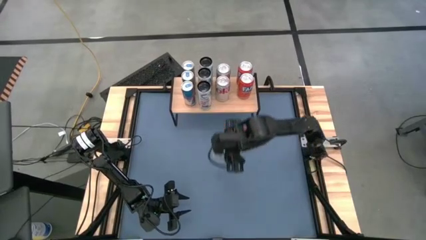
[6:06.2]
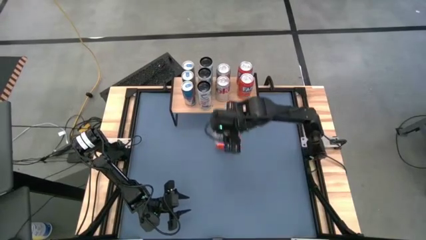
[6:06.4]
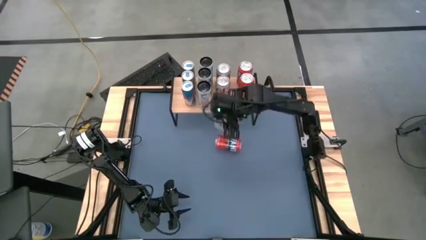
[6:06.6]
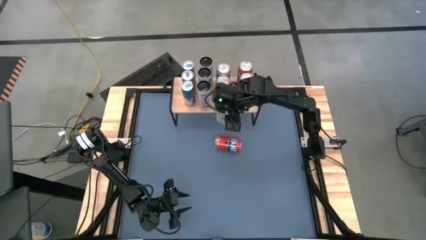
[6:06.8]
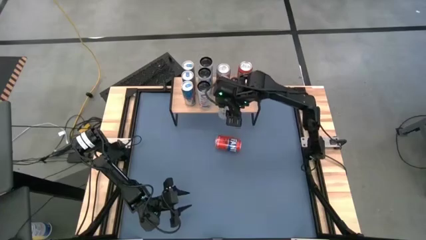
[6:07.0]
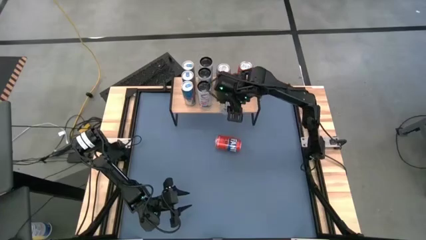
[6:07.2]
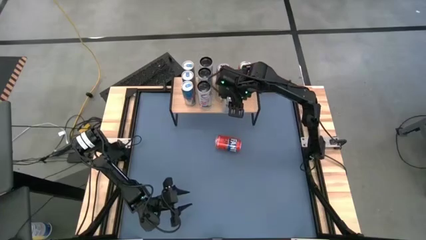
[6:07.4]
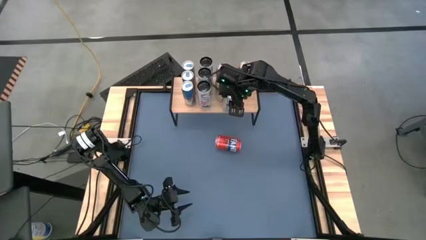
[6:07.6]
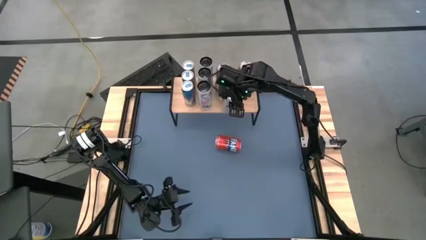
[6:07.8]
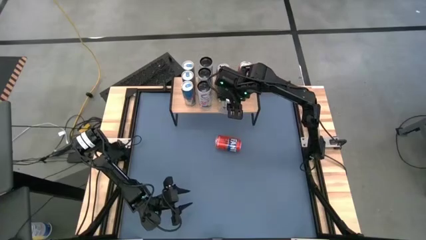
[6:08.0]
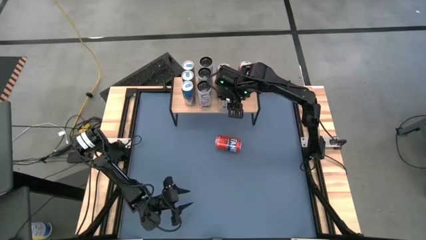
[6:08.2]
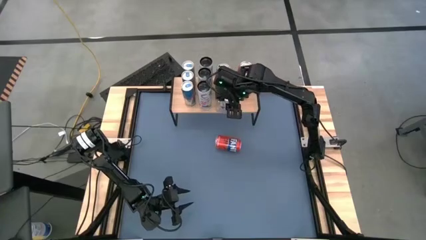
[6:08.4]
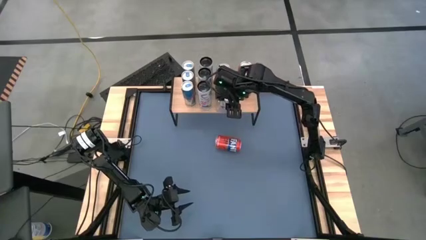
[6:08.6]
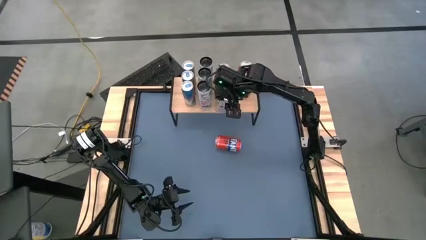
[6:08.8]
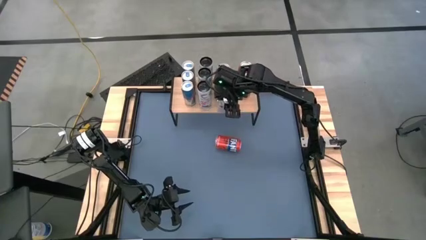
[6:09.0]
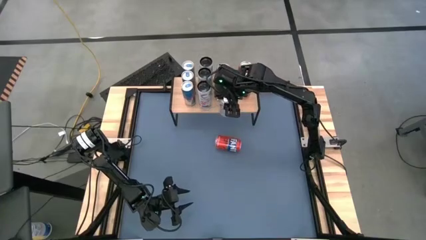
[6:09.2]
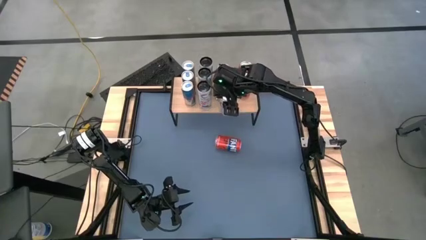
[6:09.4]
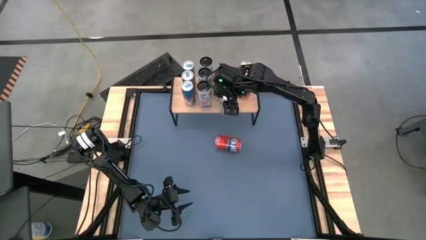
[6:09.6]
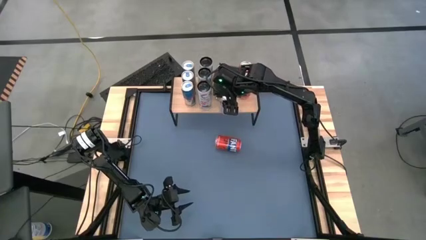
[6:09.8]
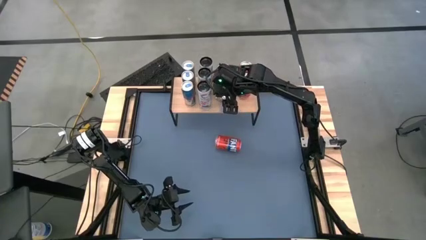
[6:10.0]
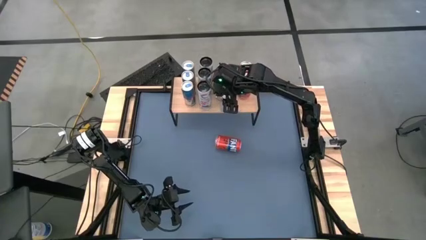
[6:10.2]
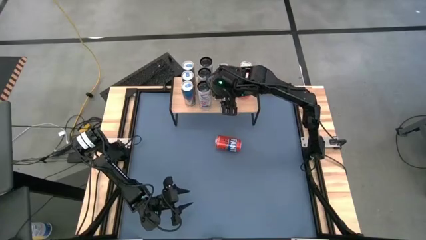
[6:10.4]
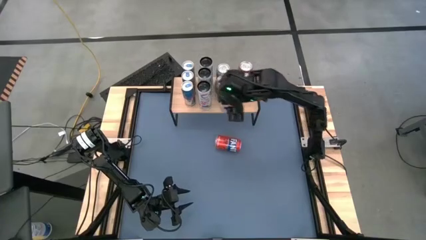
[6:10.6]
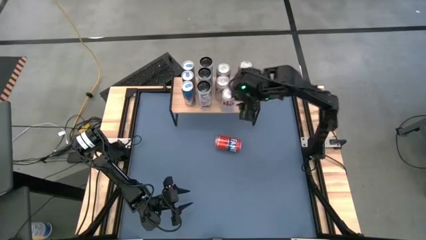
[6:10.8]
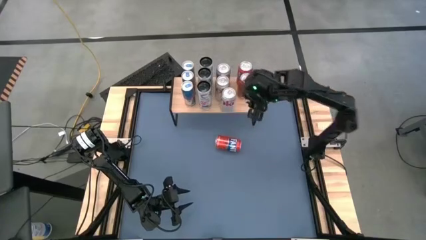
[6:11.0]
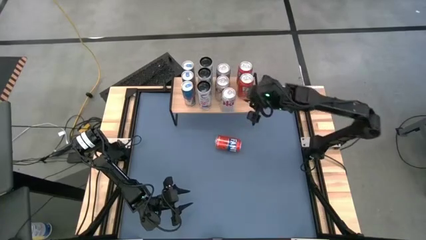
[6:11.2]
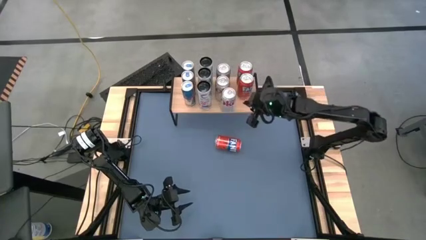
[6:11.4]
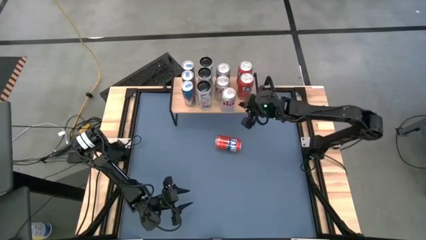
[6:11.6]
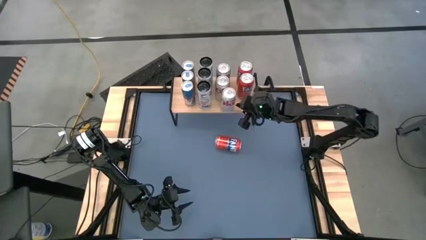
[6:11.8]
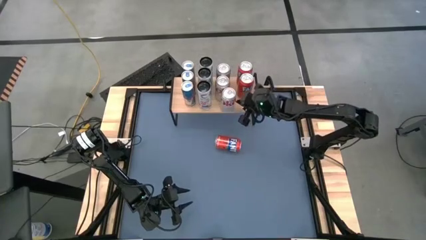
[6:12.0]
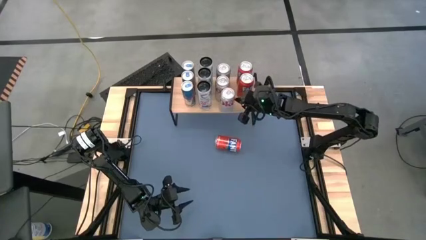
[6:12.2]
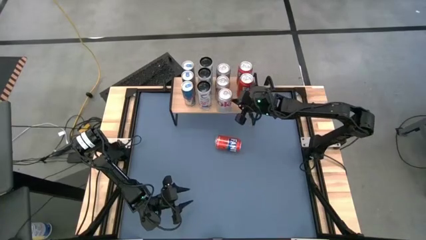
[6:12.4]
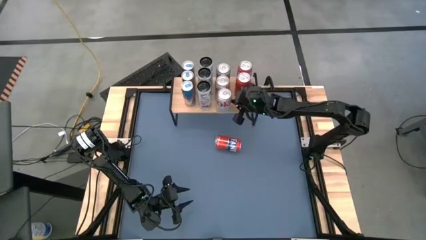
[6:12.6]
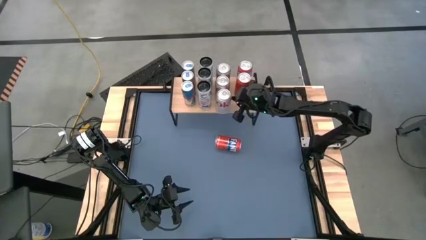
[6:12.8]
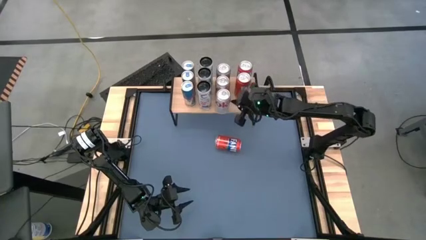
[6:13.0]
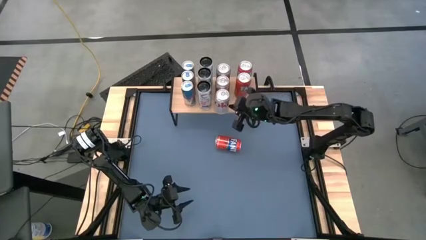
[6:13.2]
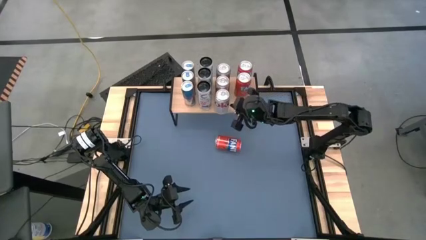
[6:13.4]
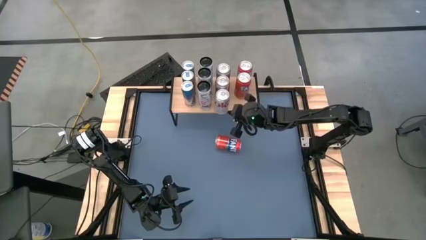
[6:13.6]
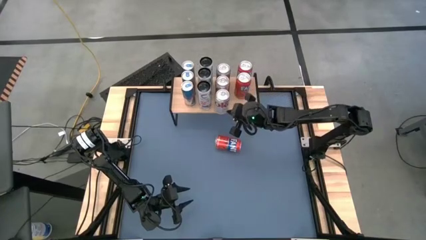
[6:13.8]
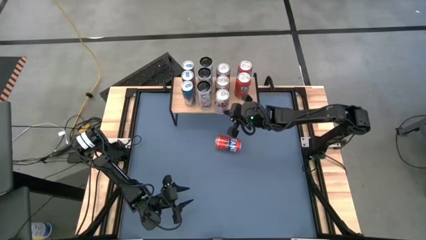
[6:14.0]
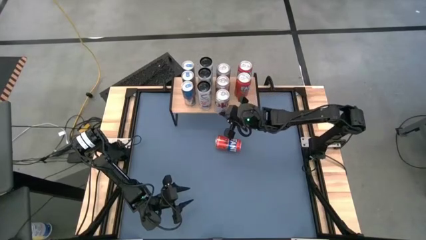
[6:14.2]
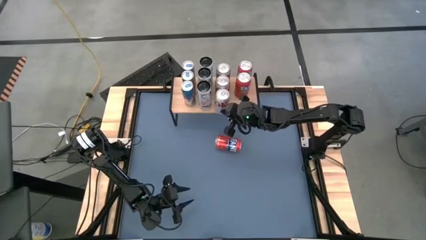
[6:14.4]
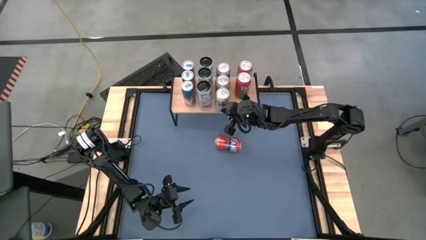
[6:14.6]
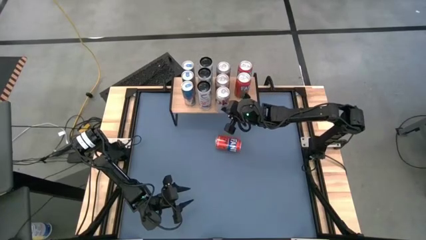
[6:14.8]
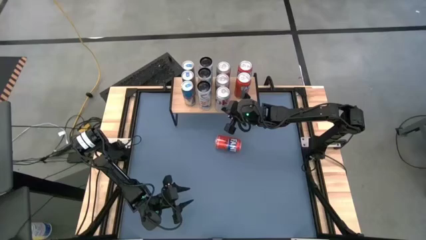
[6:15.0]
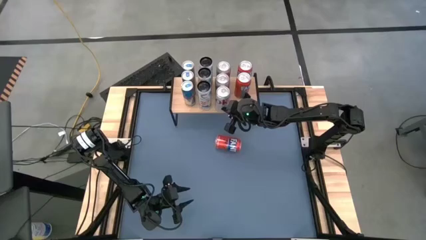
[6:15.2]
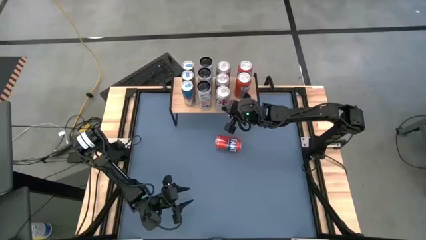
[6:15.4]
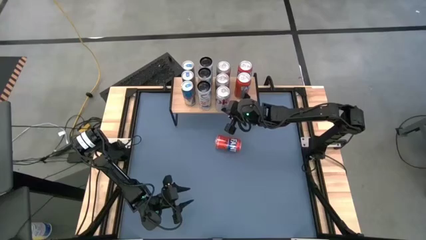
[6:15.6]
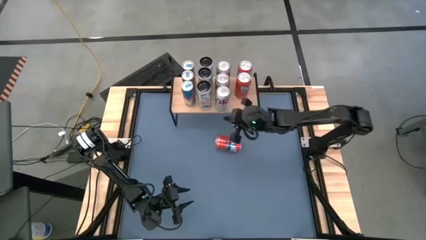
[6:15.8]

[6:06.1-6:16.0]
Task: Place canned beverage on shelf
Put the silver soda can on the shelf aligned with the other silver soda can

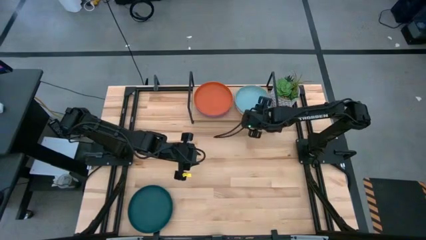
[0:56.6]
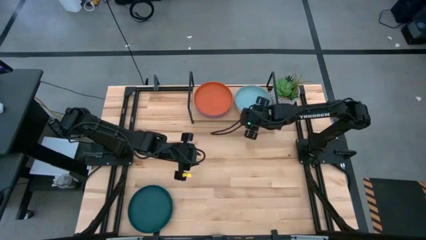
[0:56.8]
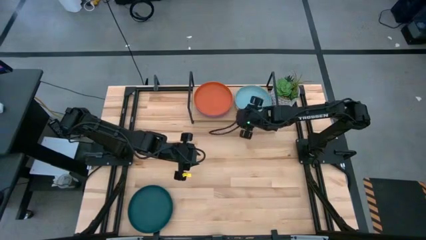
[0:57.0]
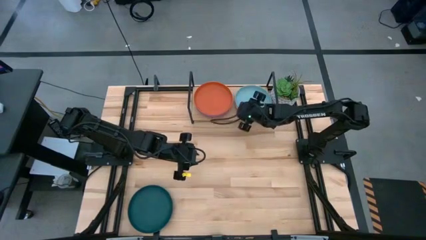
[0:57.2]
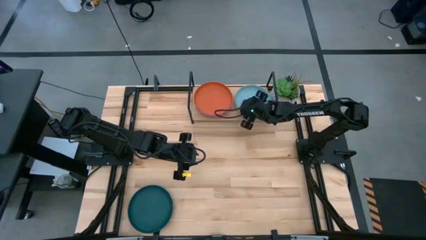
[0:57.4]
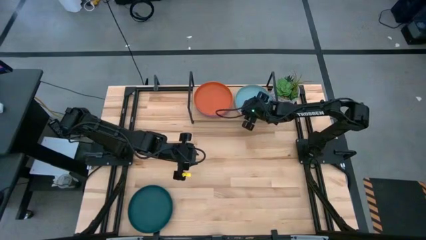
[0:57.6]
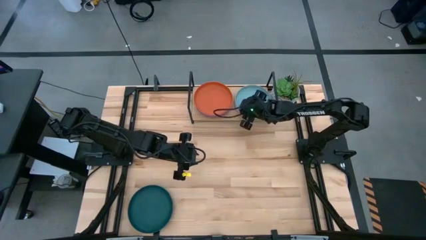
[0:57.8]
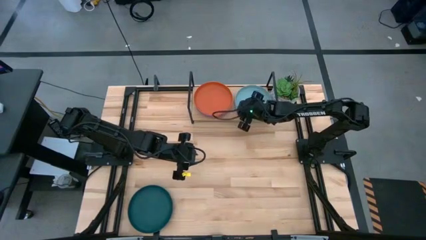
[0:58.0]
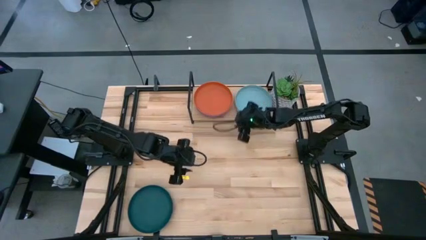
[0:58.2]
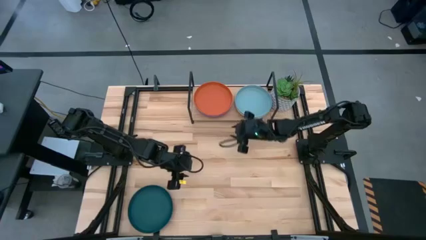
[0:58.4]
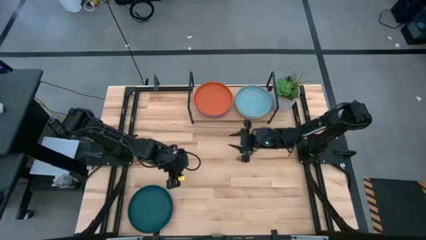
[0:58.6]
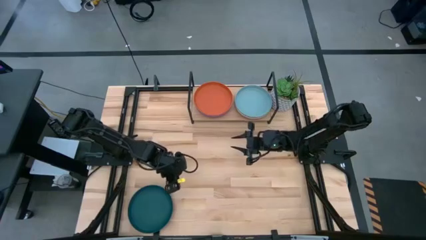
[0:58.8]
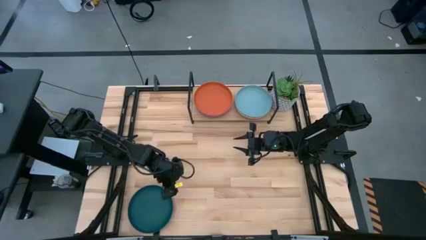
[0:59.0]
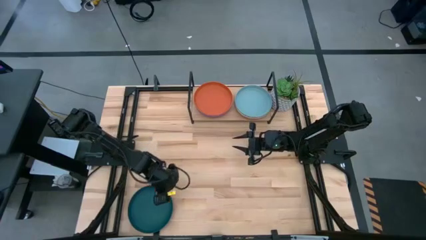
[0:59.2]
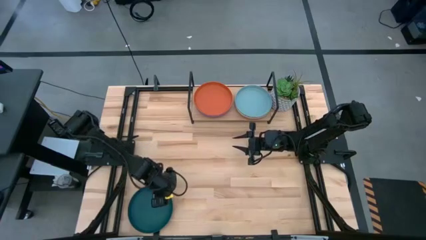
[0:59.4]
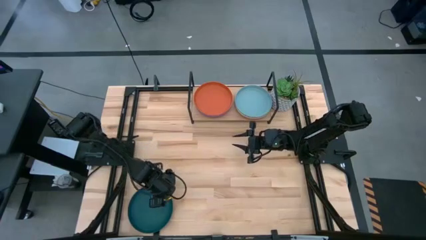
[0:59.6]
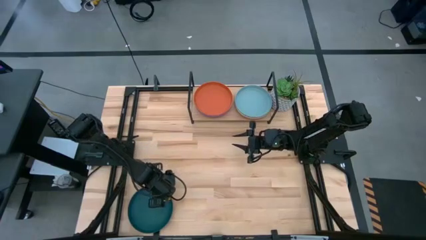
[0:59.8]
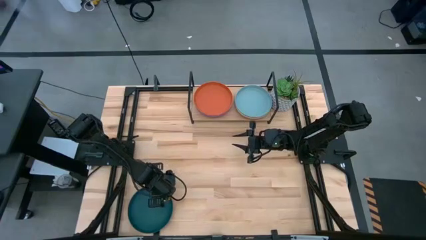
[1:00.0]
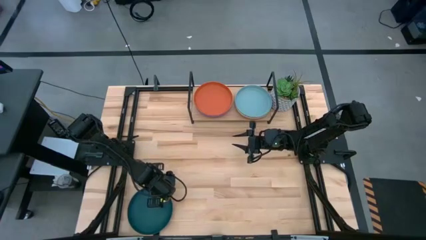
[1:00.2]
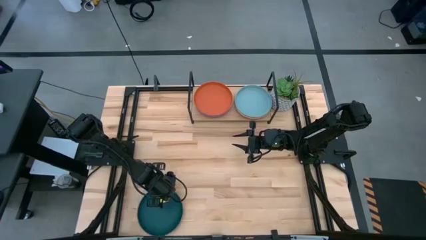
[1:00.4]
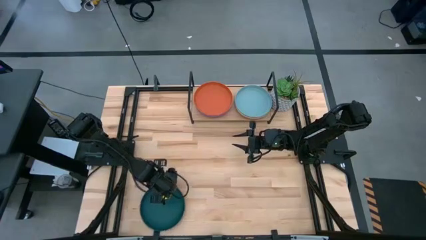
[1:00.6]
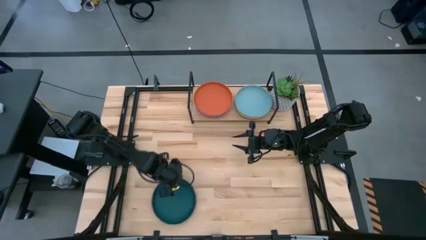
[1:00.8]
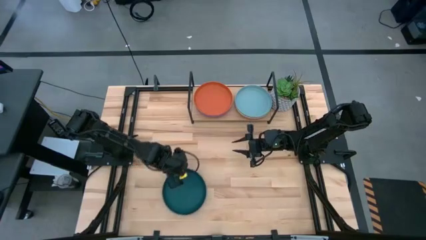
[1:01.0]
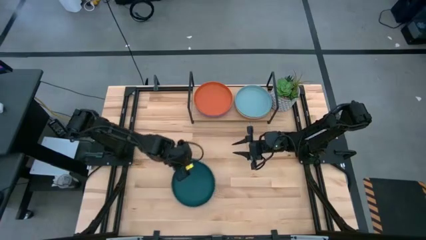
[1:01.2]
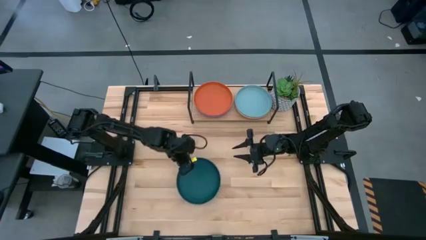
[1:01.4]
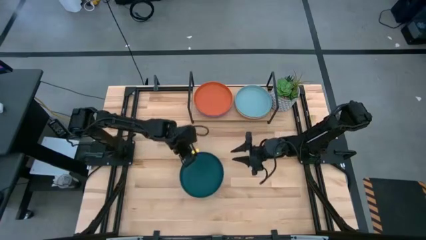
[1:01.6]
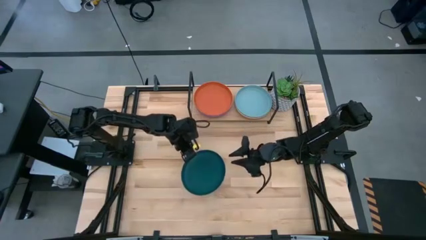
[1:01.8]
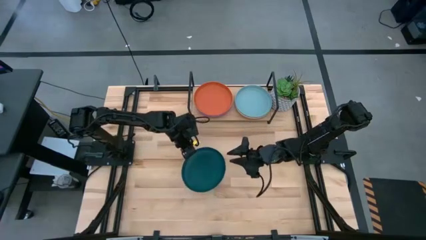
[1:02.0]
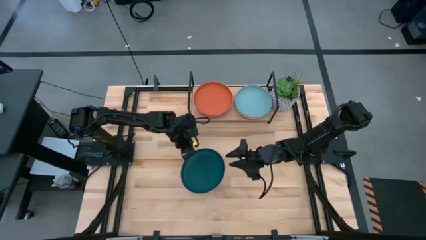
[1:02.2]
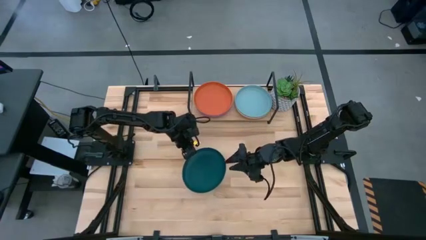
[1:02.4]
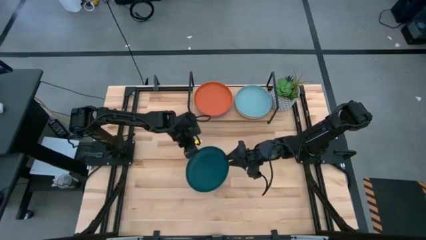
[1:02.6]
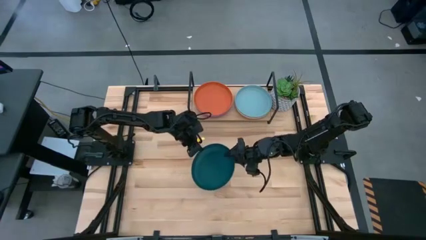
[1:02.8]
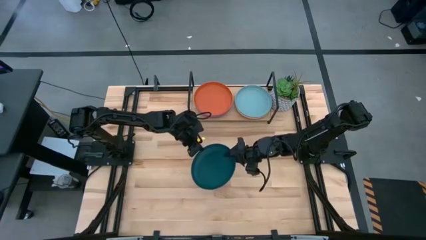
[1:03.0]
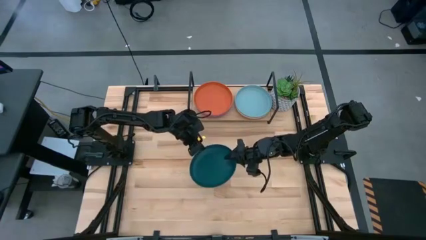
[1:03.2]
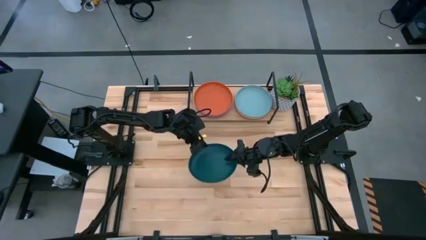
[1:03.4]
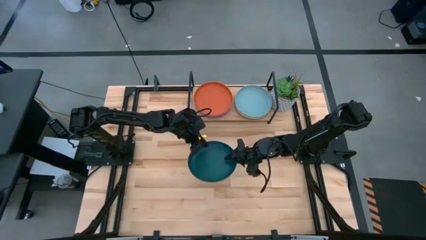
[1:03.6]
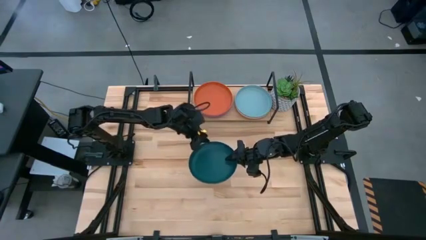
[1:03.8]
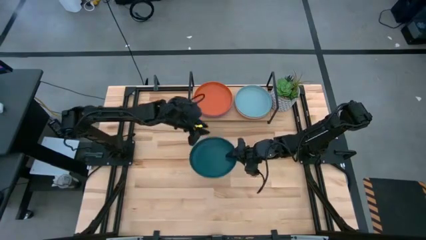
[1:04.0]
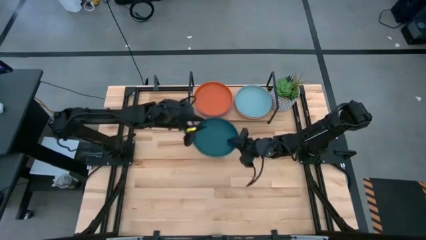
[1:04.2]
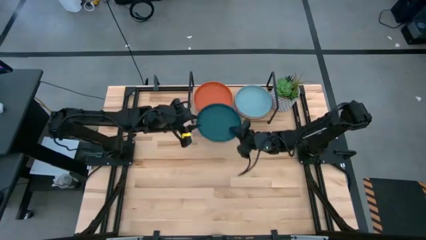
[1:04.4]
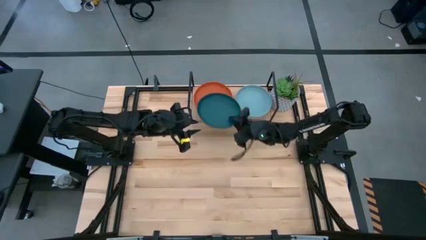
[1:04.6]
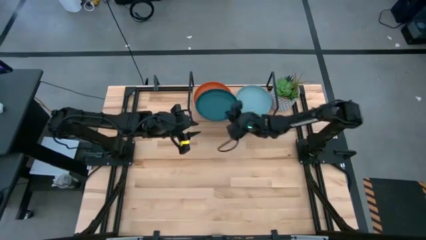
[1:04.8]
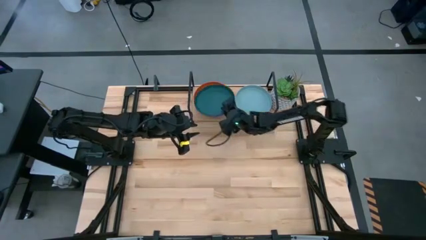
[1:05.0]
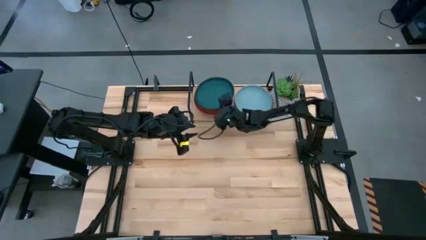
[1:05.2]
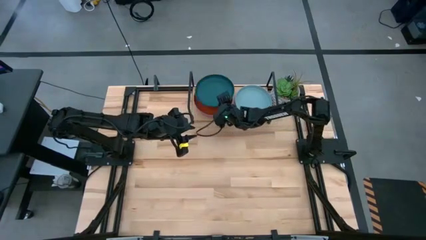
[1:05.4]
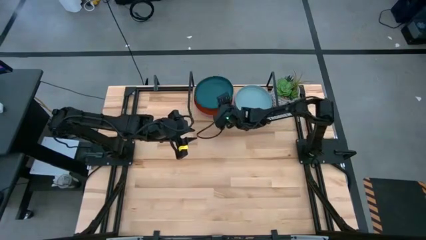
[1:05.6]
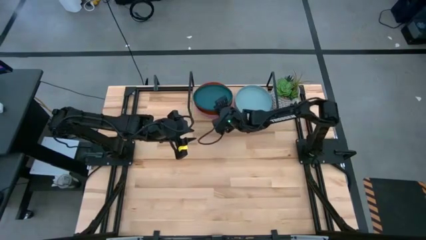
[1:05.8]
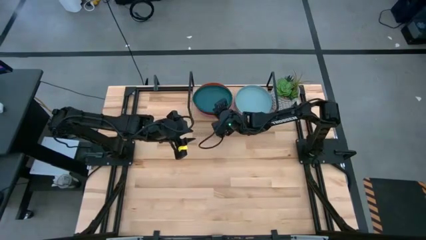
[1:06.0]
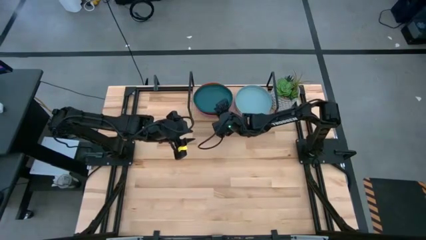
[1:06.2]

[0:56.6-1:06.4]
Task: Place and stack plates onto a shelf
Stack the dark blue plate on top of the orange plate on the shelf
